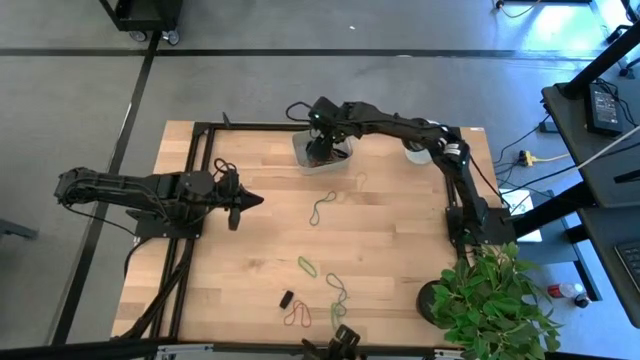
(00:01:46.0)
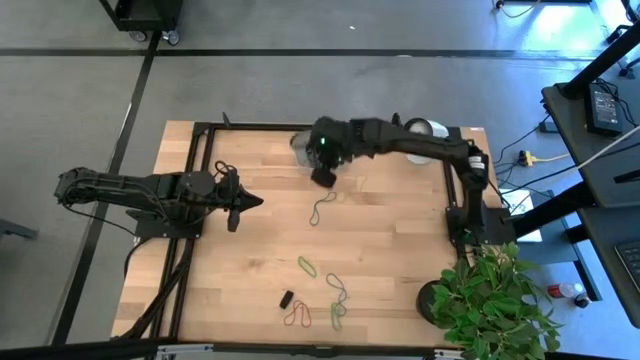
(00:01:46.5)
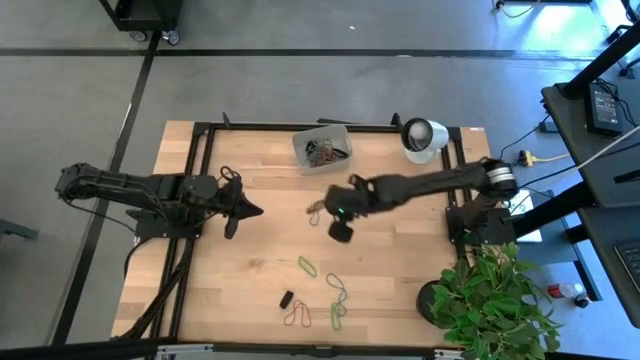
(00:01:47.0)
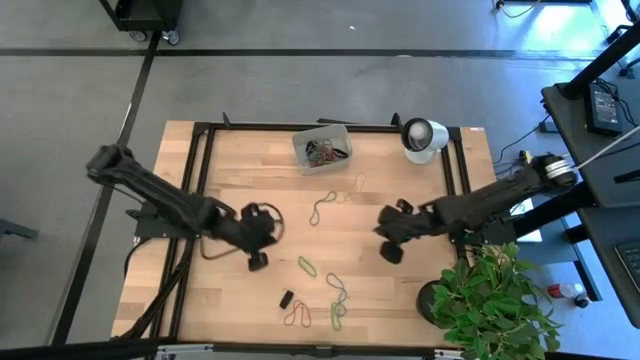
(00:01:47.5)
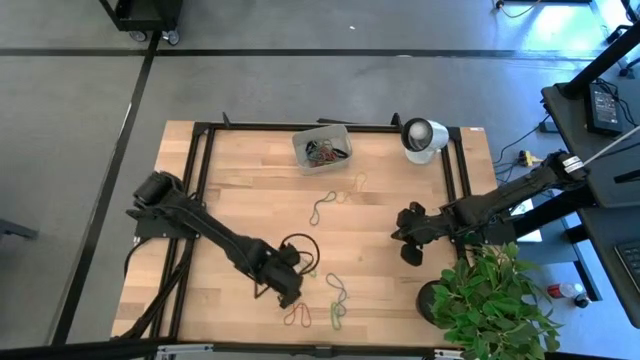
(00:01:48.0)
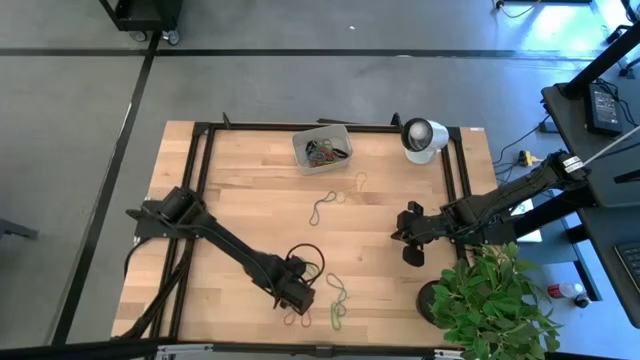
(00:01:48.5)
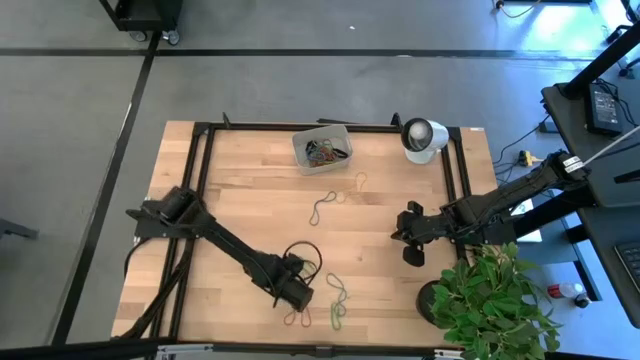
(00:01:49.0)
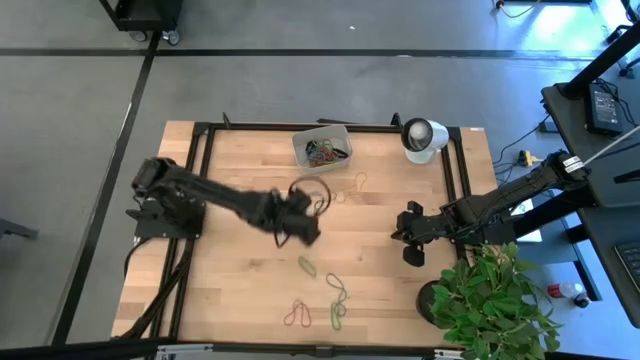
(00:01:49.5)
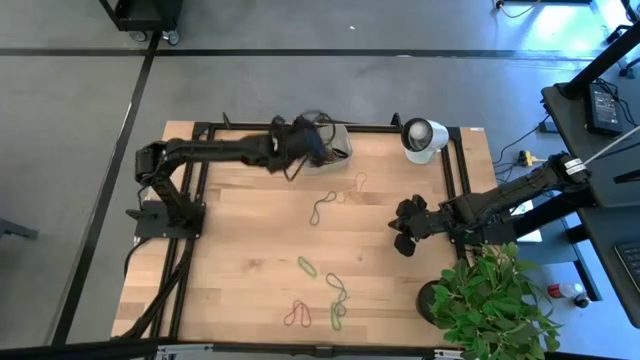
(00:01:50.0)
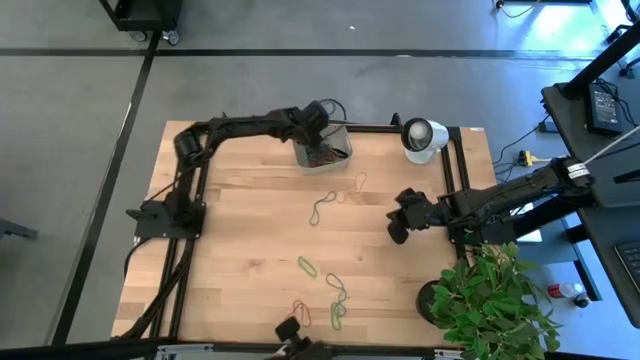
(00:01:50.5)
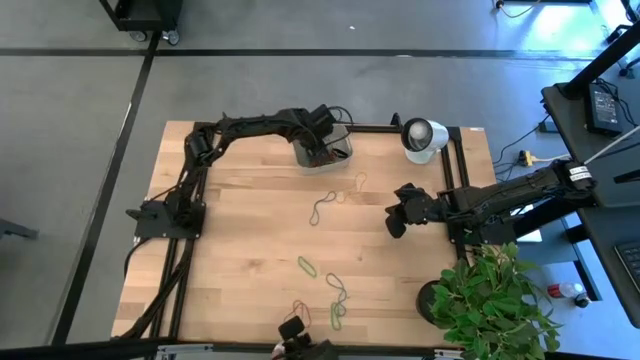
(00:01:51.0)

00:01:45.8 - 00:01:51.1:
Task: Pick and place rubber bands into bin
Put the black rubber band into the gray bin

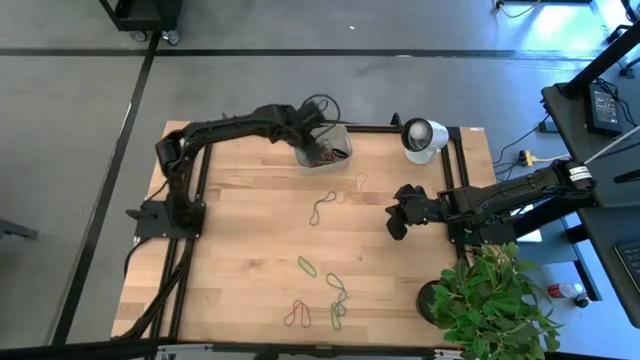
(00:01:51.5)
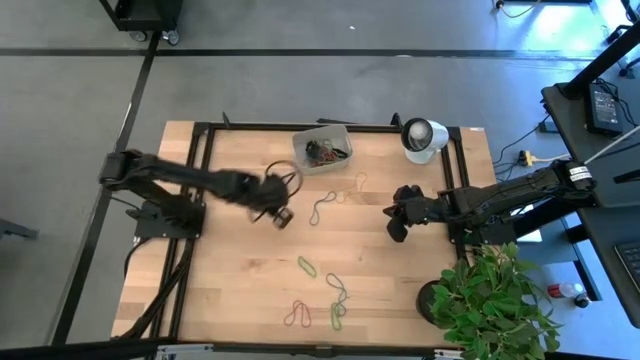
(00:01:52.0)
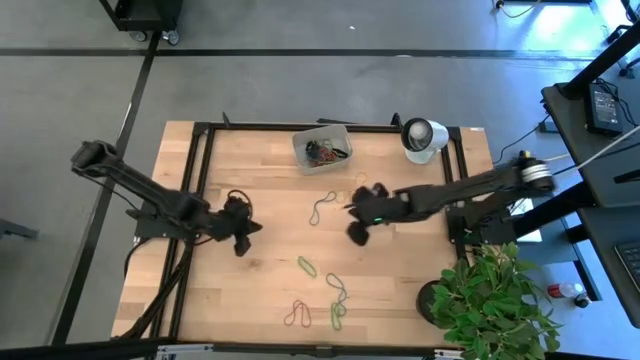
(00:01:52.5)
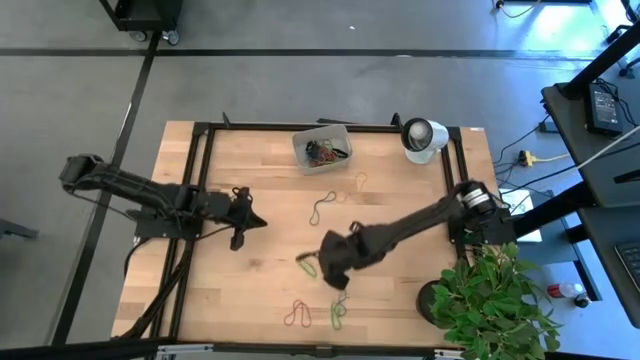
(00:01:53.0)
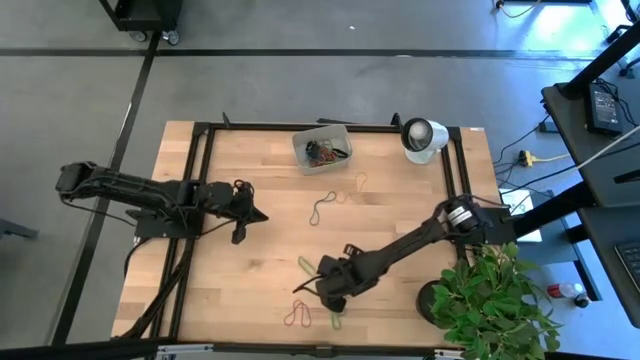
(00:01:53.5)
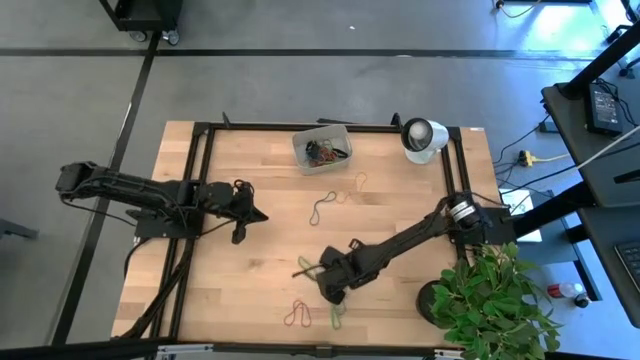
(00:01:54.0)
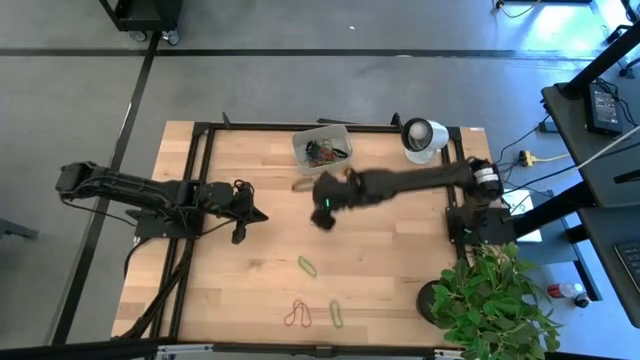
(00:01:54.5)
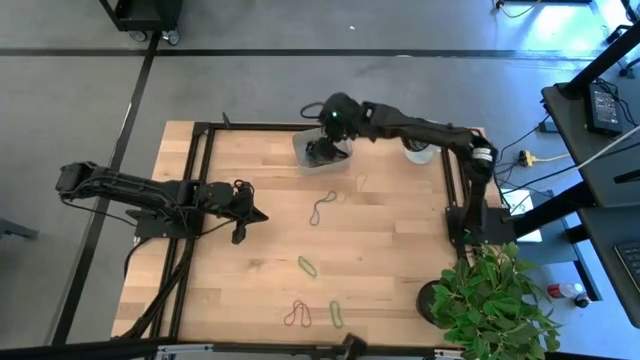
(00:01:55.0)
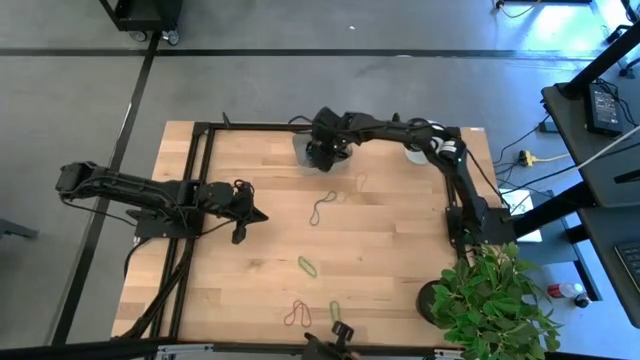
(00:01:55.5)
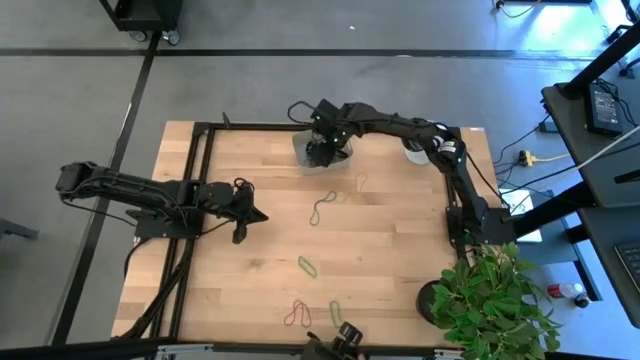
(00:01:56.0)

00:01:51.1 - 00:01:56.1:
Put the bottom blue rubber band into the gray bin

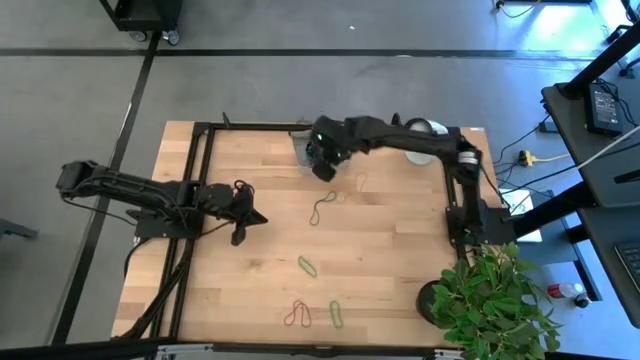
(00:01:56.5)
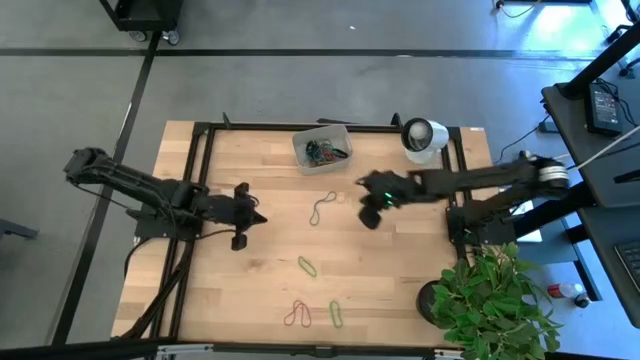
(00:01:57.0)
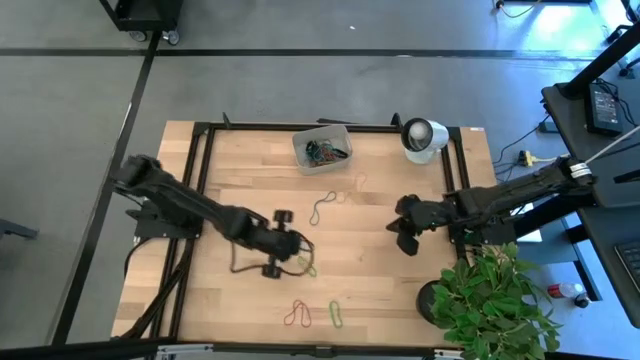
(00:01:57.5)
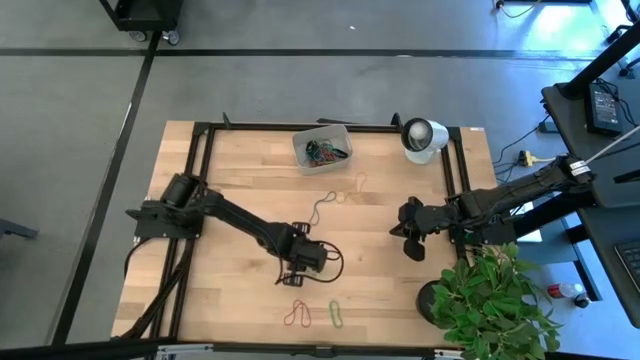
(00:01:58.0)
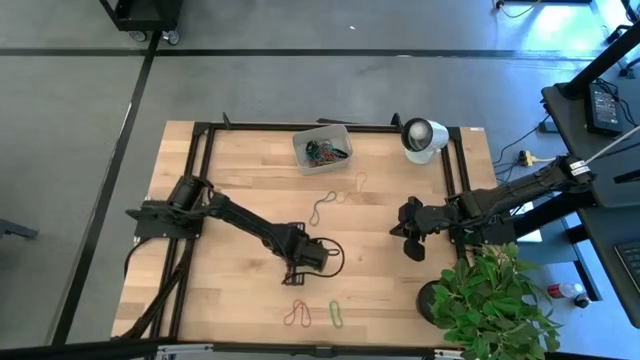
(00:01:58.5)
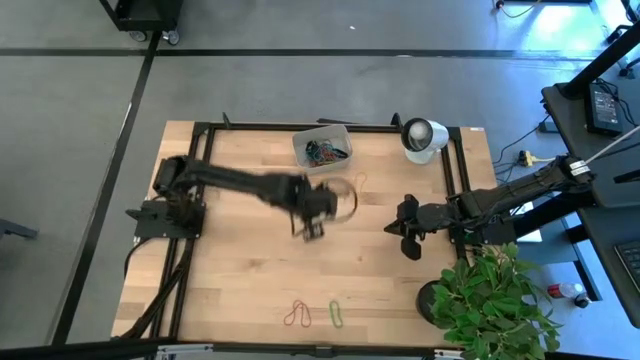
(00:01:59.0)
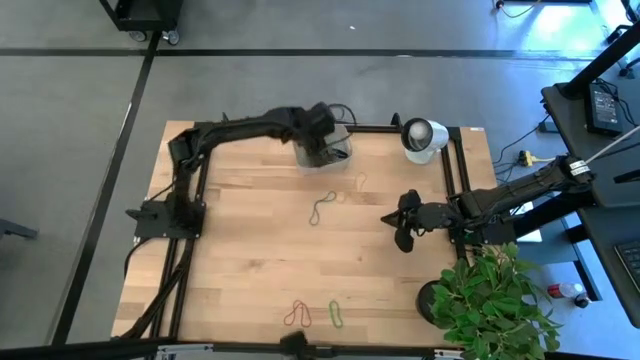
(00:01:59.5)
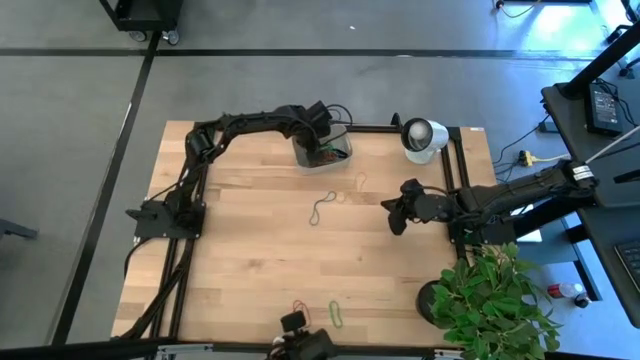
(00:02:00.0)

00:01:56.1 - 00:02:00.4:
Put the top green rubber band into the gray bin

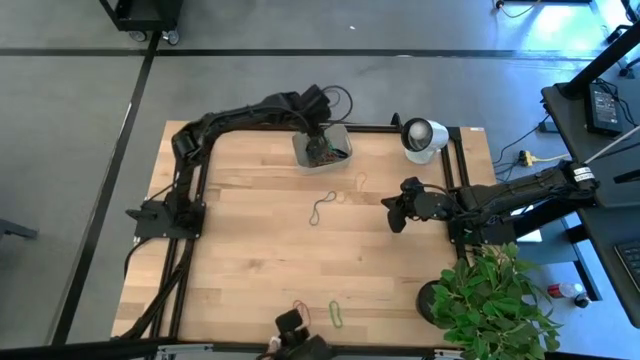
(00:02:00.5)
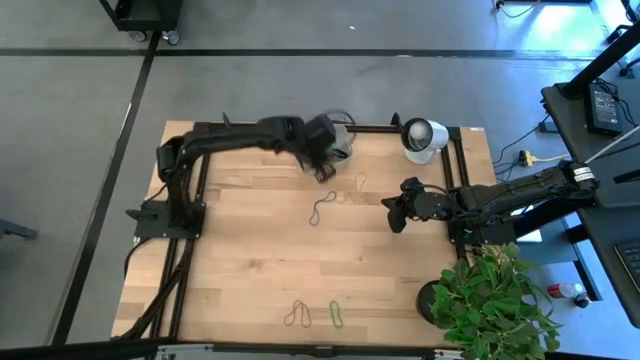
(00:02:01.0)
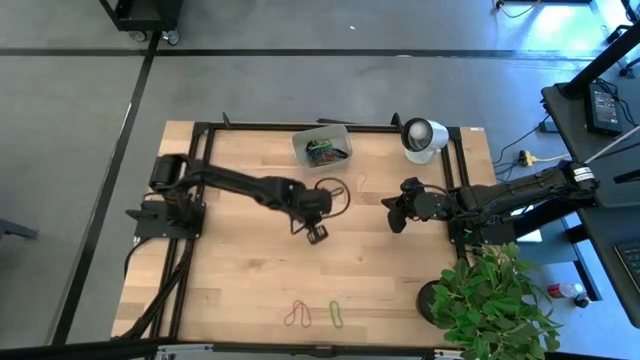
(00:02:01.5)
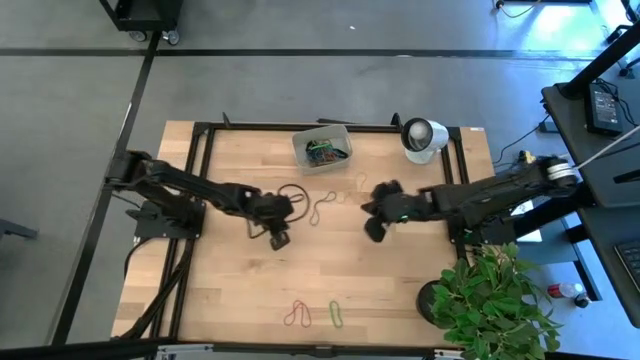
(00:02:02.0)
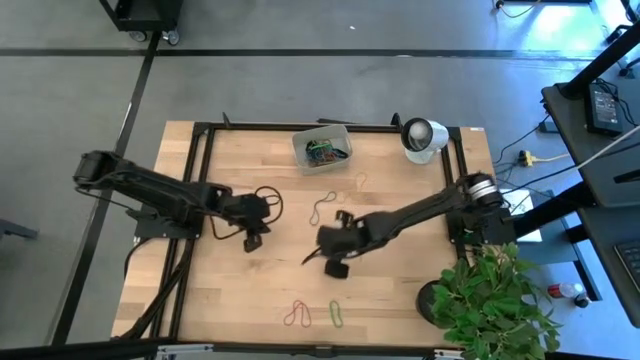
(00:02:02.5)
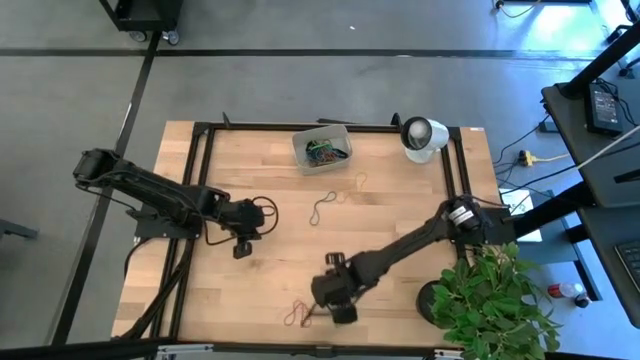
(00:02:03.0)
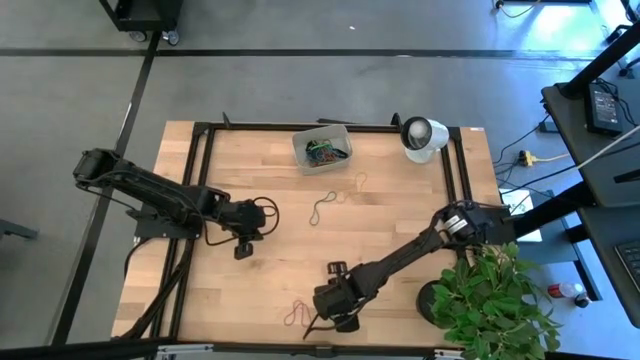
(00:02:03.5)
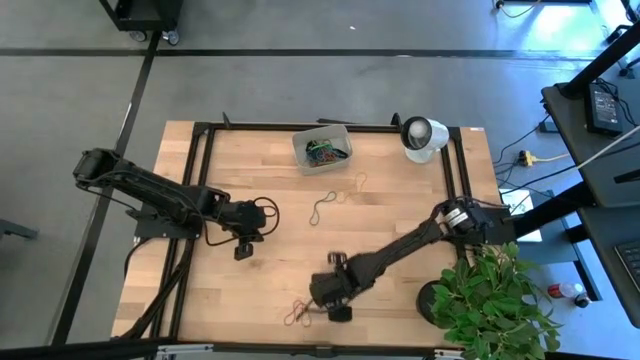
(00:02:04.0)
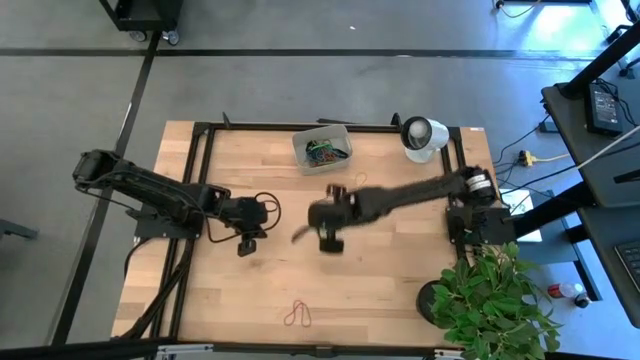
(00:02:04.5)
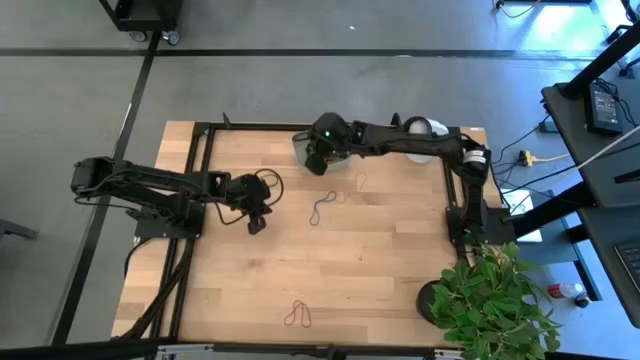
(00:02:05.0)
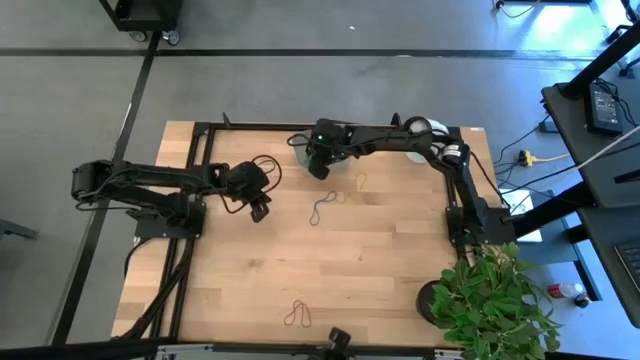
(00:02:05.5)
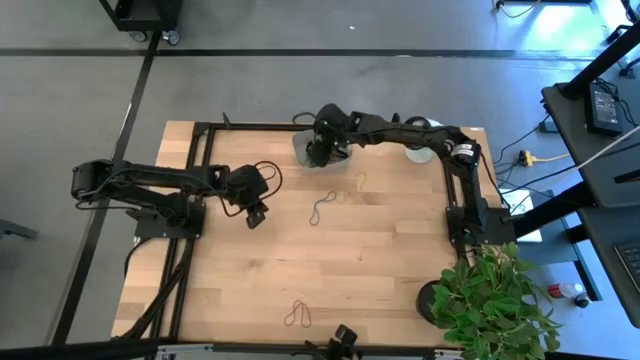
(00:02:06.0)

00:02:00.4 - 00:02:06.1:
Put the green rubber band into the gray bin
